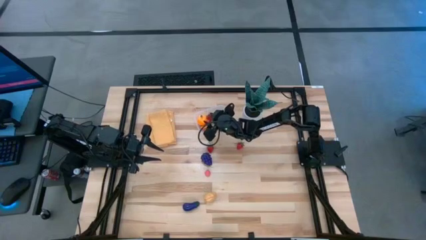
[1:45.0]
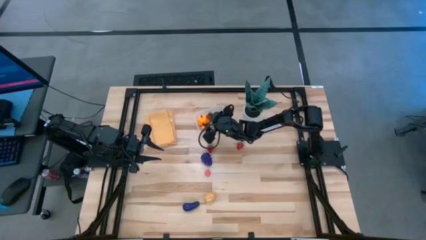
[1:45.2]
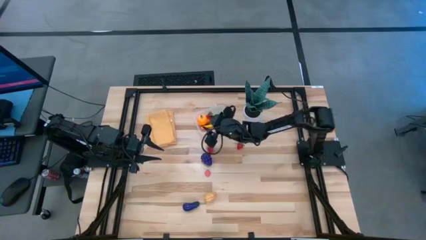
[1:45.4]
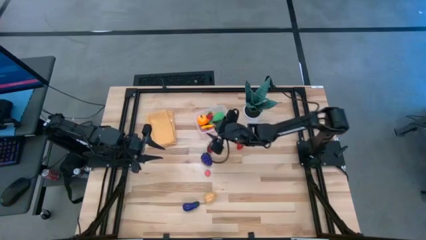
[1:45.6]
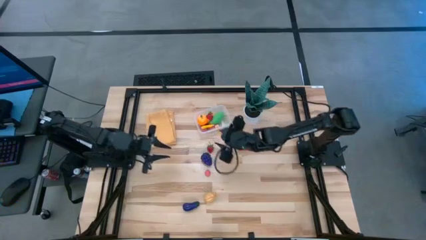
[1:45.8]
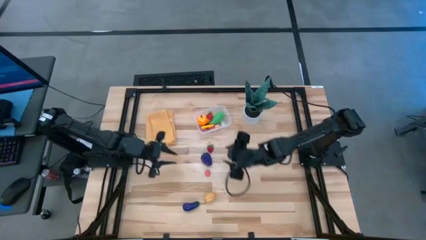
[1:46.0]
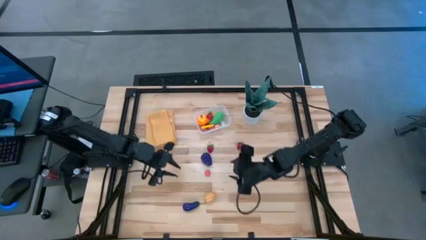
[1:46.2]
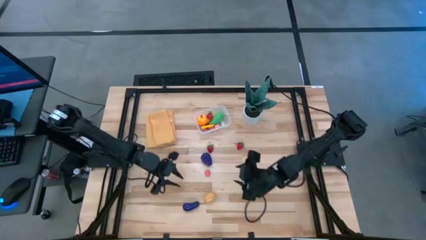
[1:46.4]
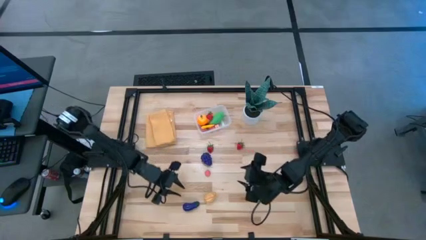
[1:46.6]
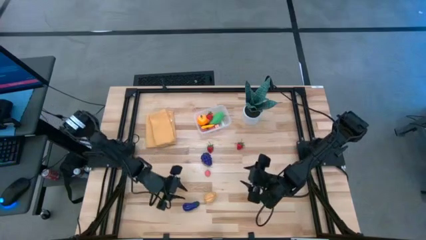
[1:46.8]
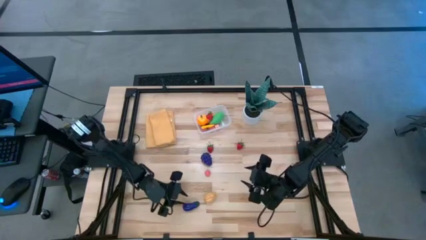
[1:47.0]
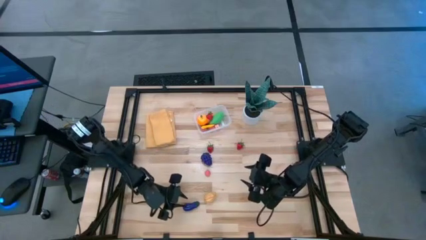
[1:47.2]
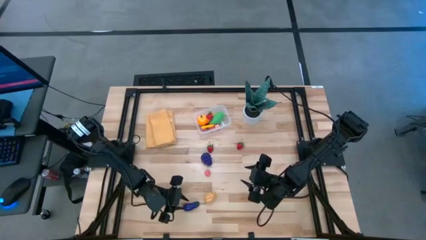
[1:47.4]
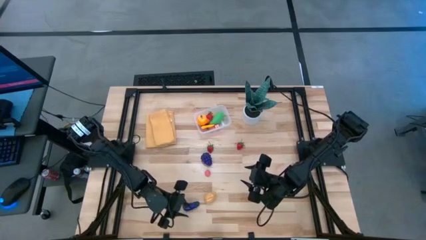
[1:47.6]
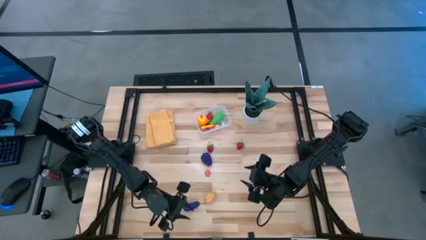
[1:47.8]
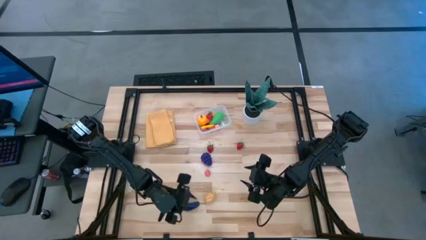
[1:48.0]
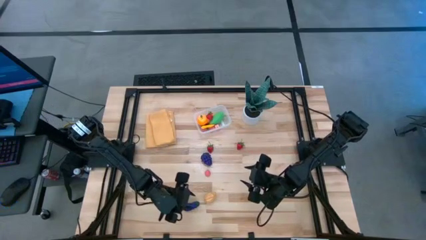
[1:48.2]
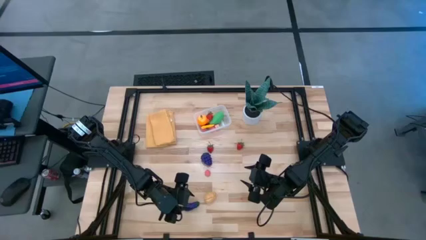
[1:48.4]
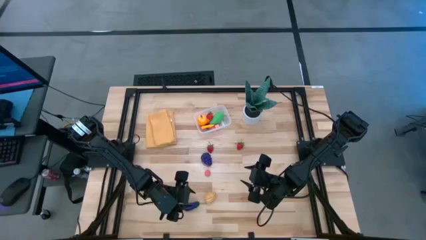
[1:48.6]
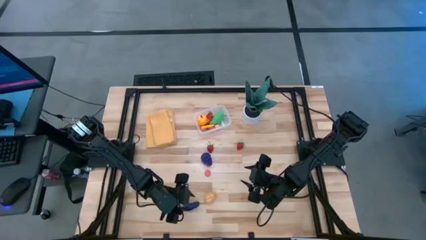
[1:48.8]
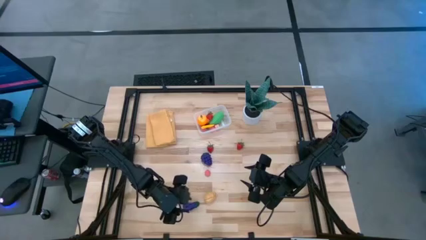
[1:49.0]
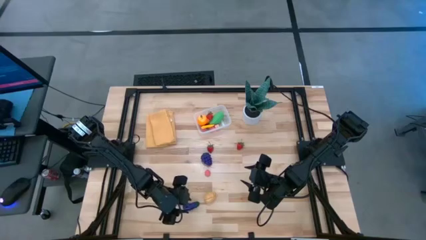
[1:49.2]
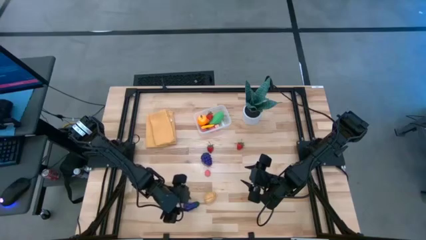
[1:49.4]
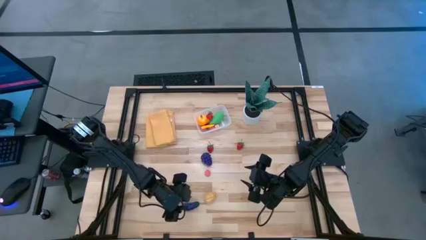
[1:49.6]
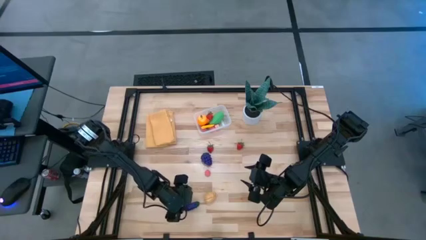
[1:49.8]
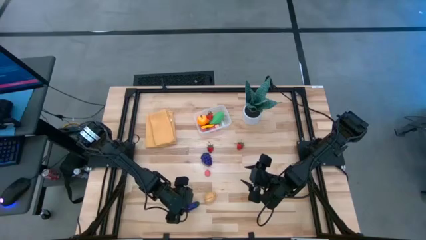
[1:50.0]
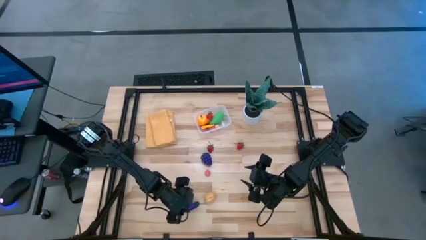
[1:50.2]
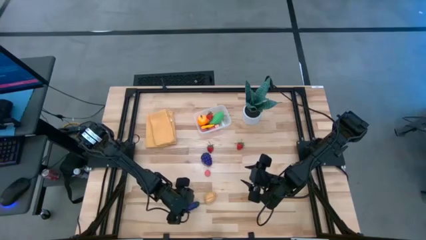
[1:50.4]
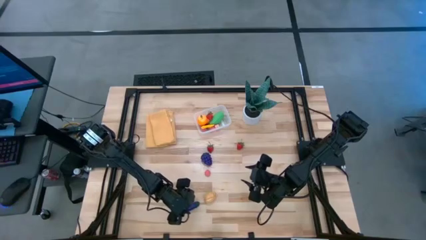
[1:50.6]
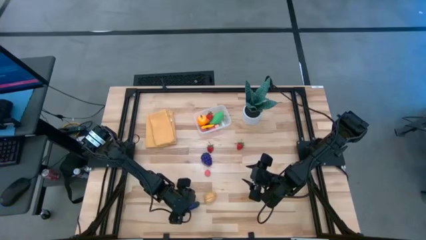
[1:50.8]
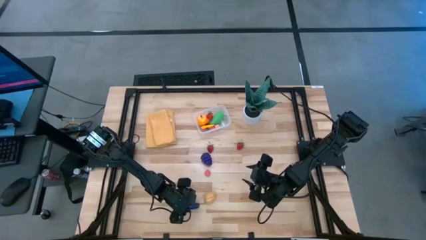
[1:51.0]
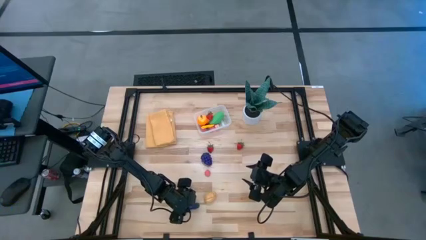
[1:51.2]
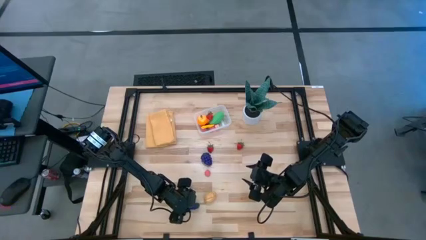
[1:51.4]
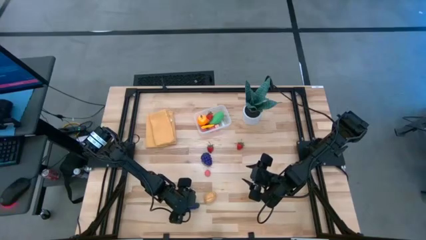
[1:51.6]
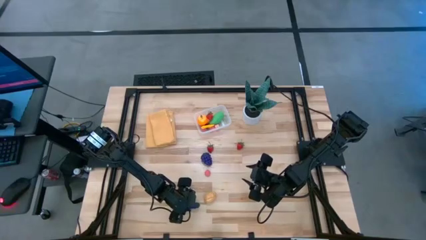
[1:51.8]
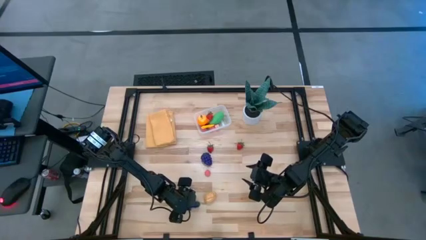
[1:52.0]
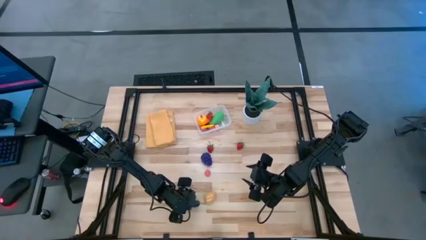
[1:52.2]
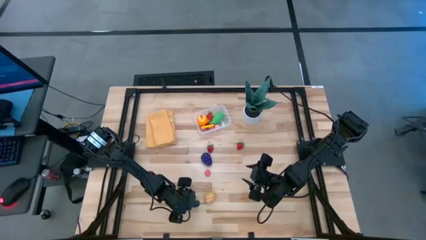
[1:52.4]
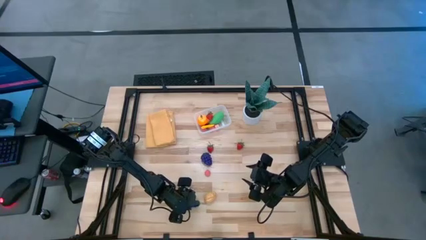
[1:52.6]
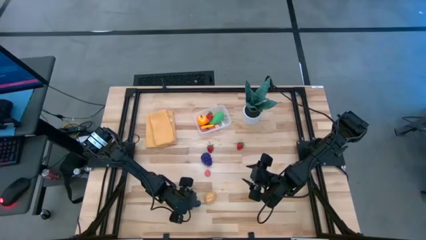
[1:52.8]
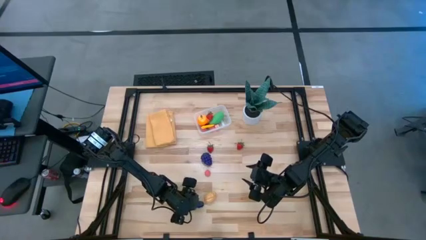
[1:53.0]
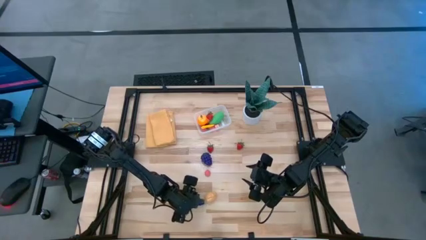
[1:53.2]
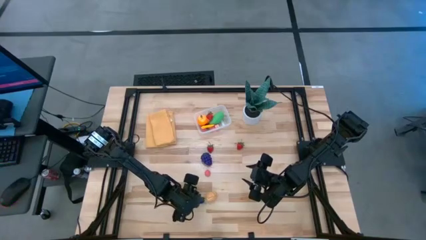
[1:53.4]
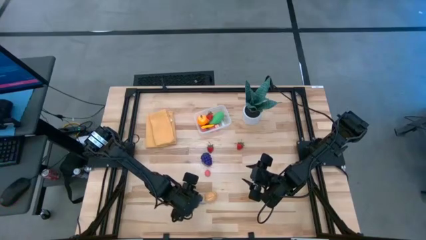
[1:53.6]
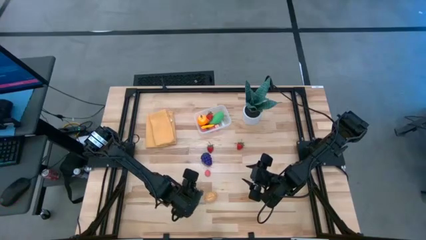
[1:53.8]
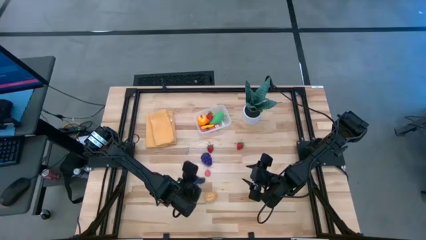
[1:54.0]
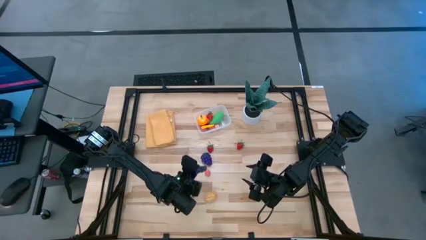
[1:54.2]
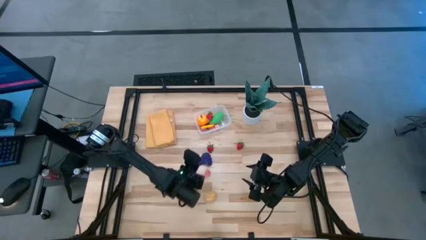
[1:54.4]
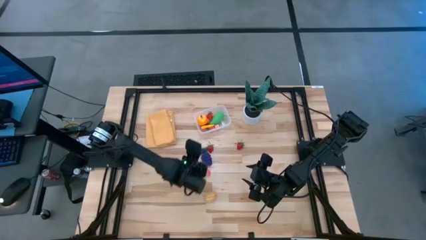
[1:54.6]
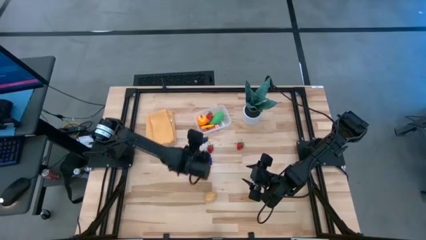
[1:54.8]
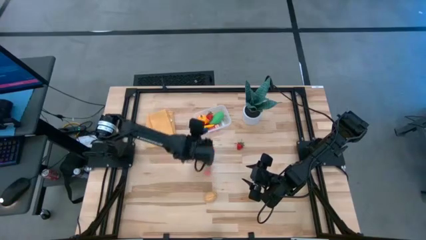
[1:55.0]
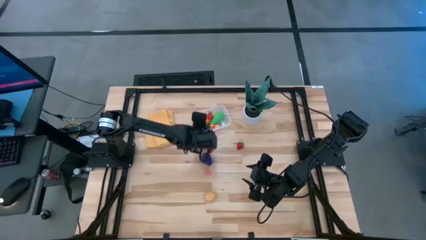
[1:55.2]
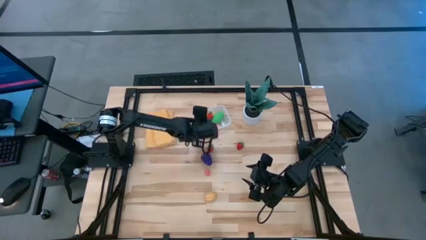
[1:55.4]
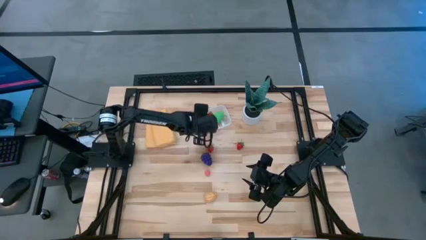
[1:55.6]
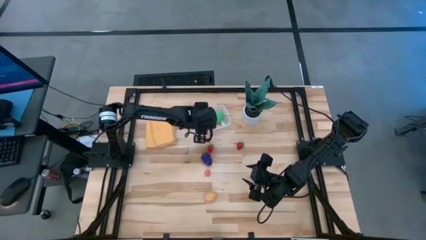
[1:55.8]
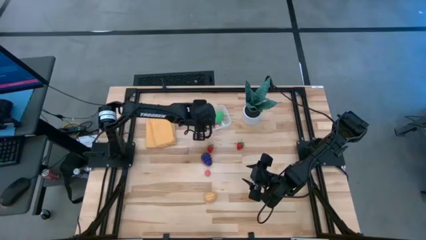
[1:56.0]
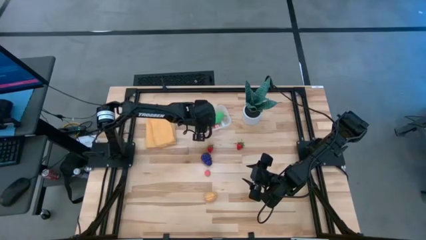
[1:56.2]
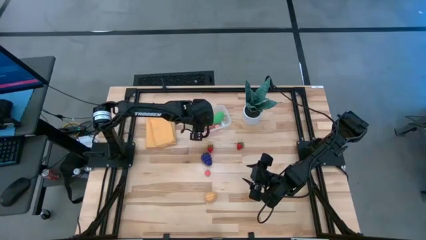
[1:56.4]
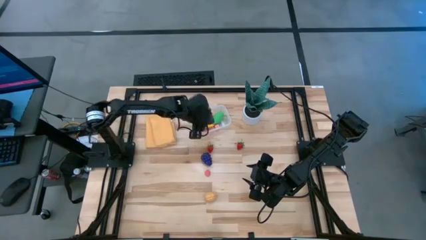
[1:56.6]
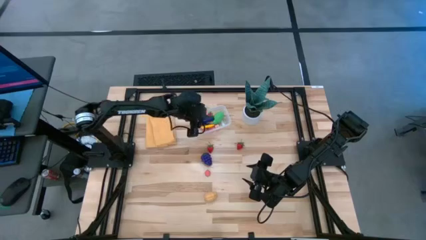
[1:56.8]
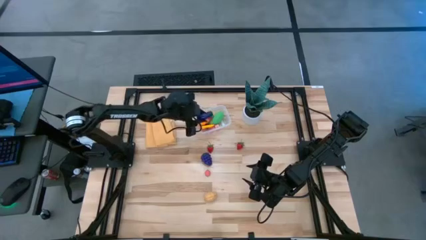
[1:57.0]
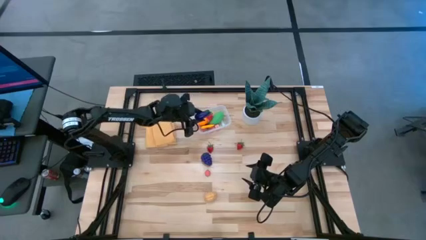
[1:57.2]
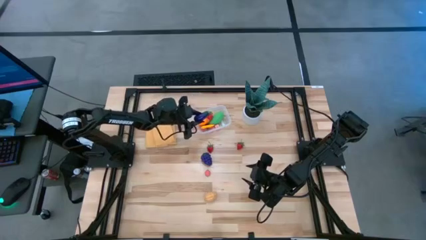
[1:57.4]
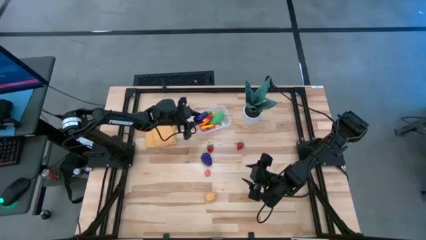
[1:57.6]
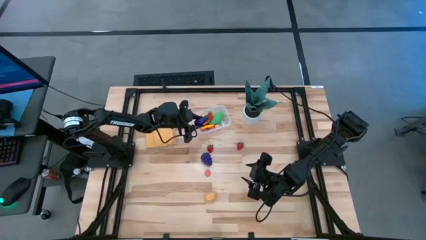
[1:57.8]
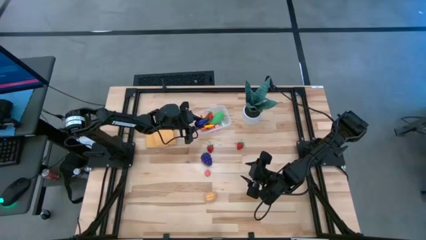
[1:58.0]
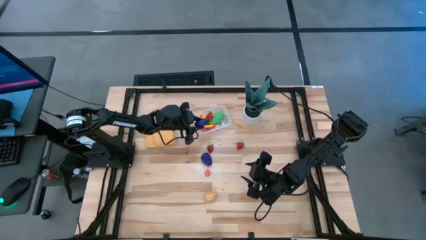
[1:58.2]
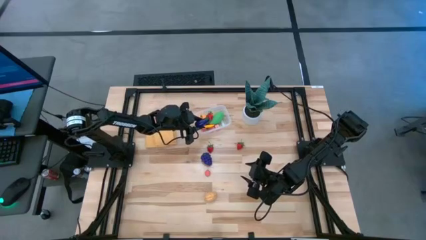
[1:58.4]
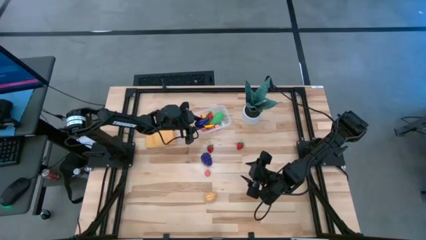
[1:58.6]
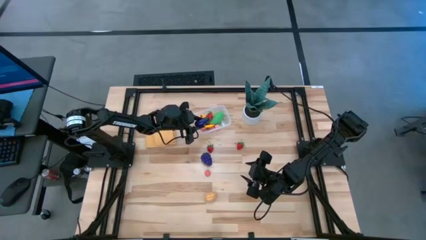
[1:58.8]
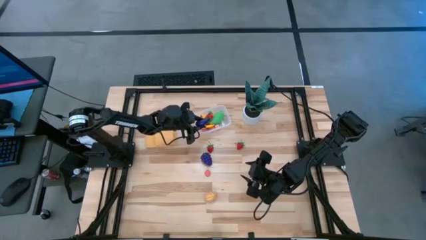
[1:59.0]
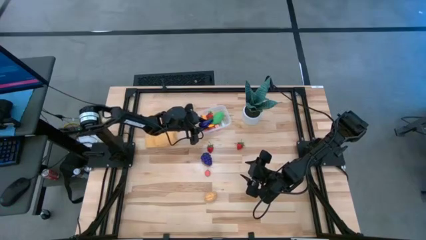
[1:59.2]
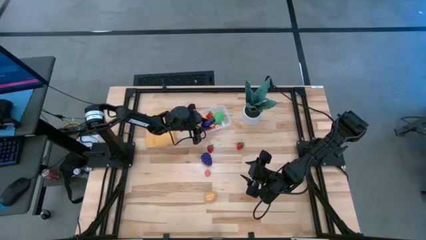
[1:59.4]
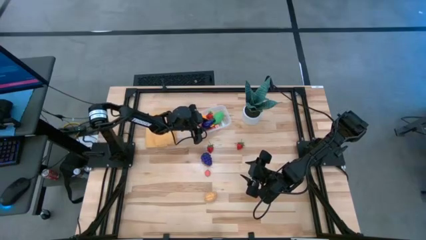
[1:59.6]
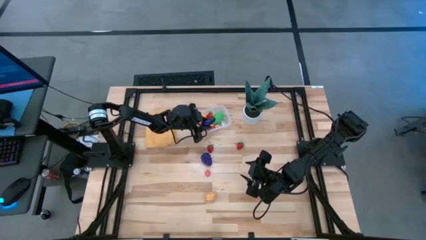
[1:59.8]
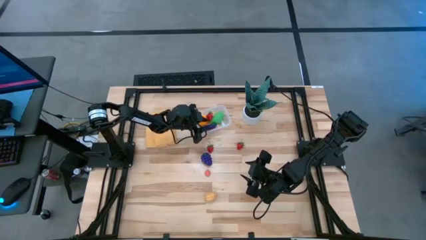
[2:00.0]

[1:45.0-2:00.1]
Task: Pick and placing Produce into tupperware
Put the eggplant into the transparent bin

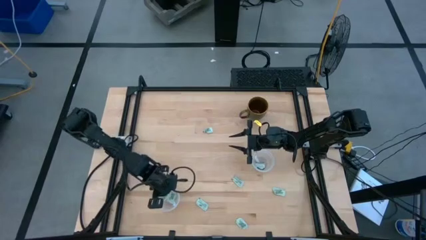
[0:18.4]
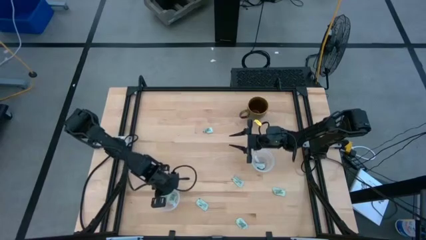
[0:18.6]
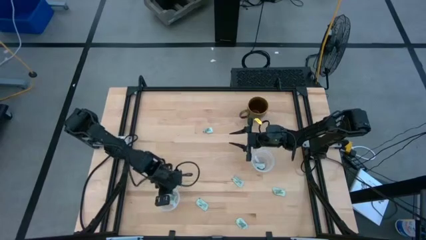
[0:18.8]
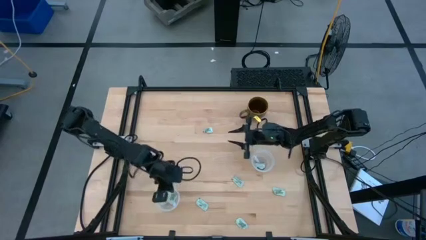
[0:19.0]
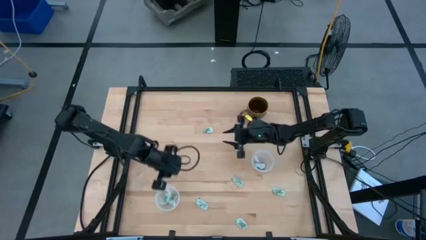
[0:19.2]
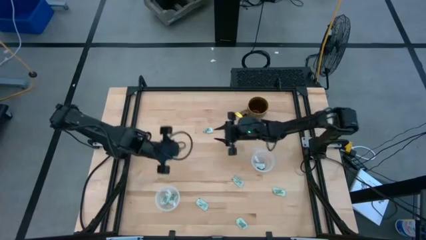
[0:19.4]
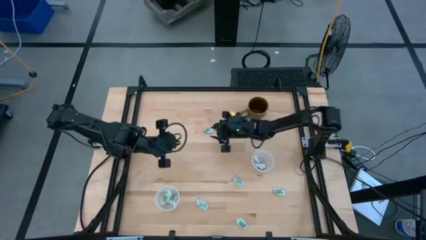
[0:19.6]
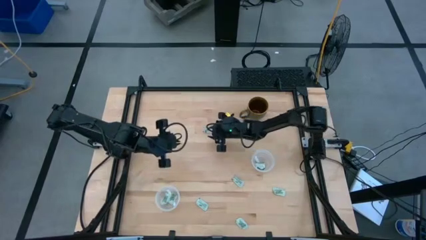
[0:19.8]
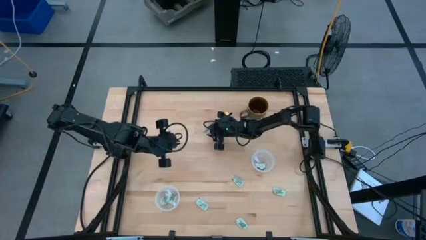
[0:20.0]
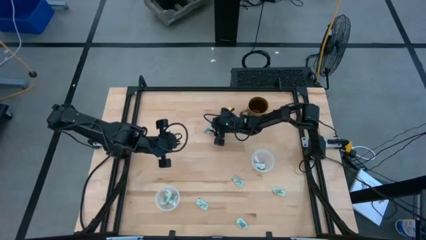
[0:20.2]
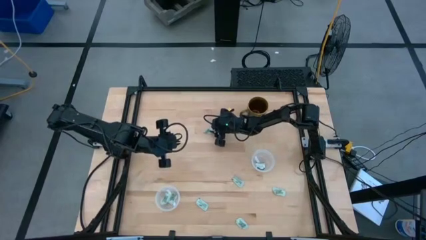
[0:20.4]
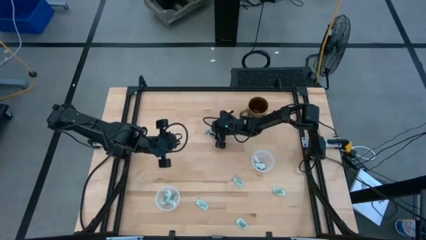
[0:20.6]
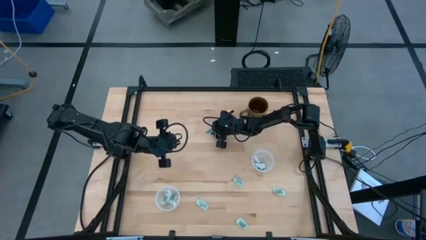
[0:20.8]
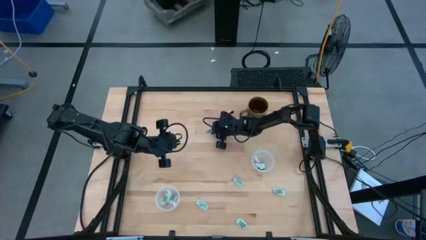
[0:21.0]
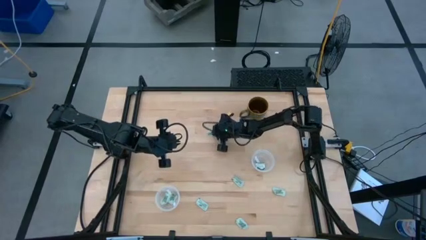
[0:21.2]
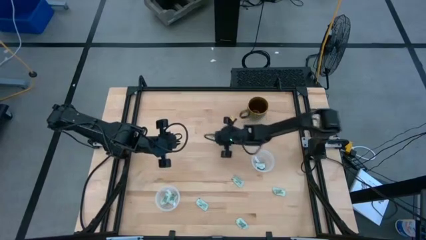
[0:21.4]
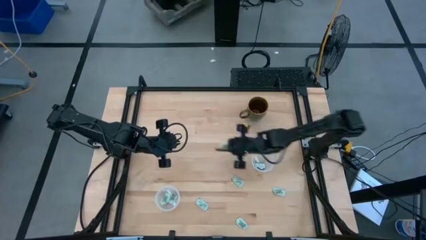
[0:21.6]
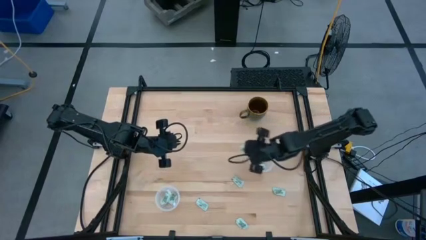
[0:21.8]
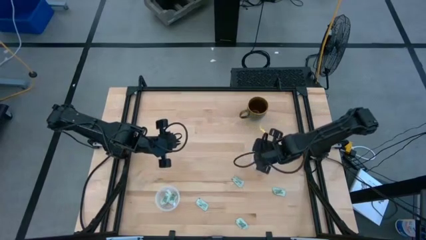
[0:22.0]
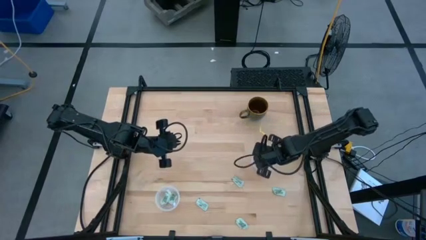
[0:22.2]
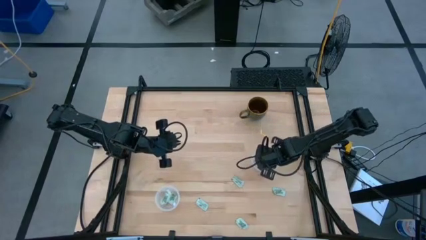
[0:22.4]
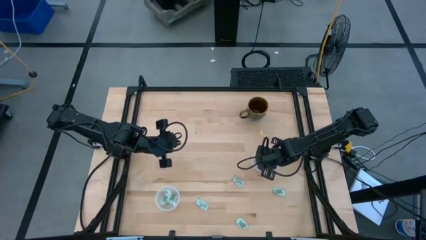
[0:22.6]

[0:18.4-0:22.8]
Task: Pick and place Stevia / Truvia into bins
Put the stevia packet into the top transparent container
